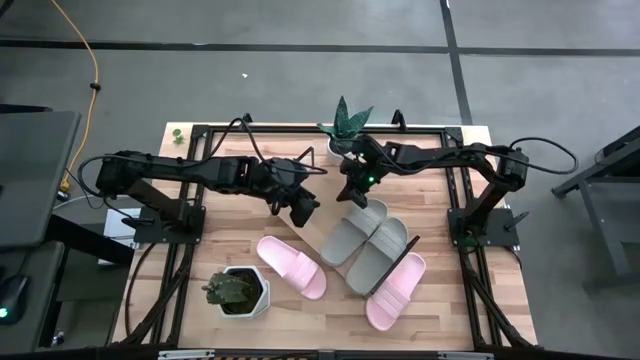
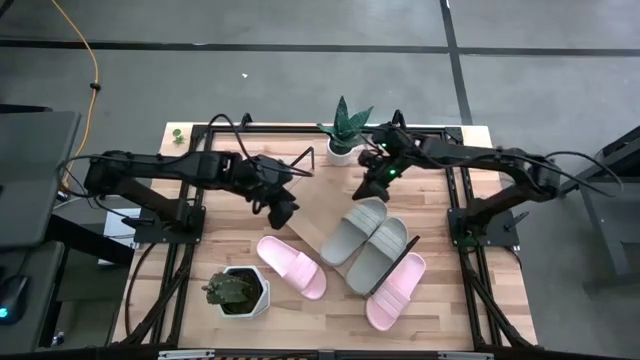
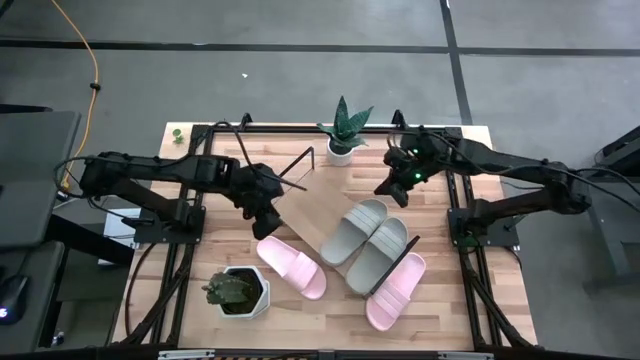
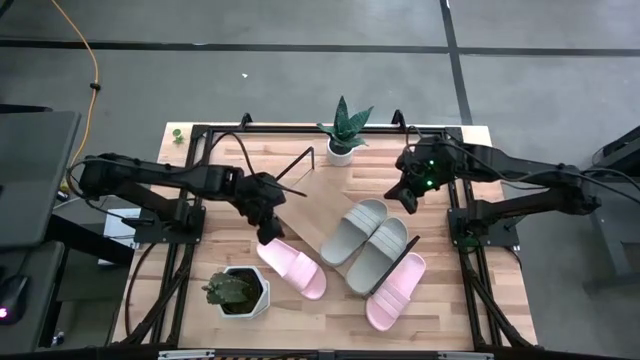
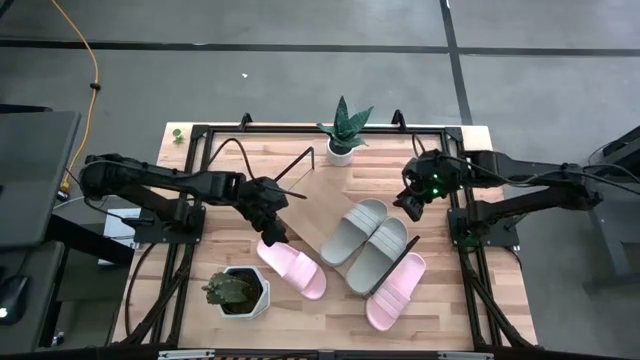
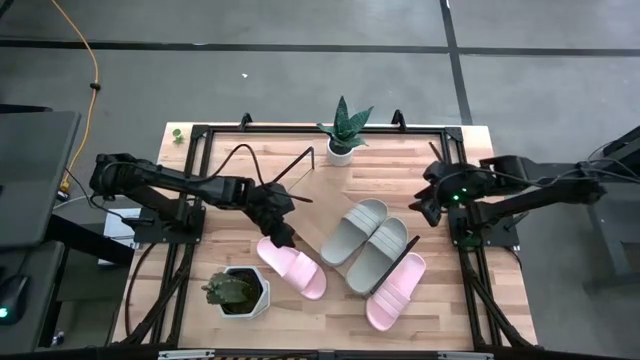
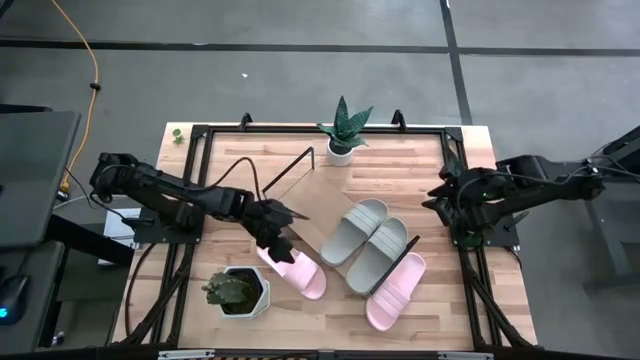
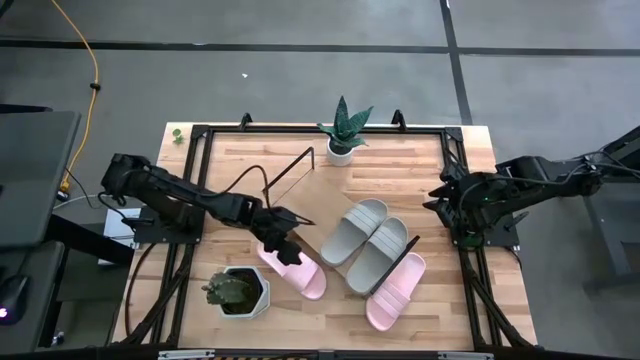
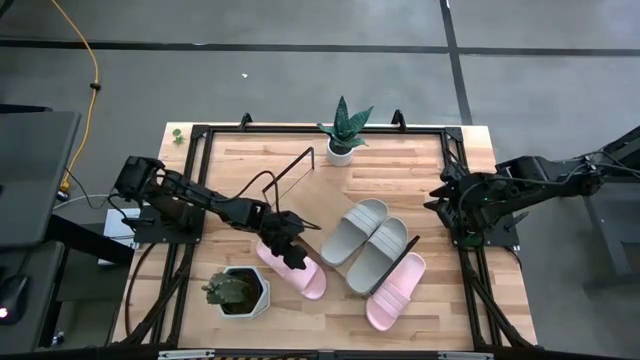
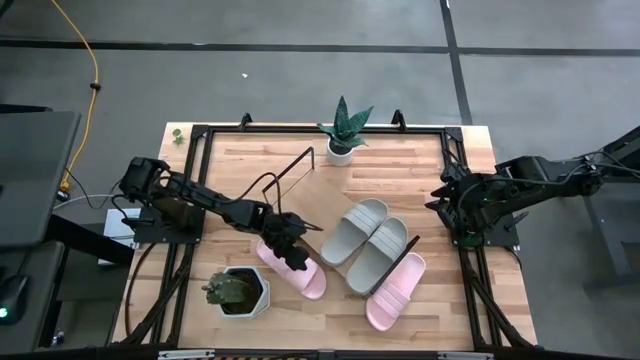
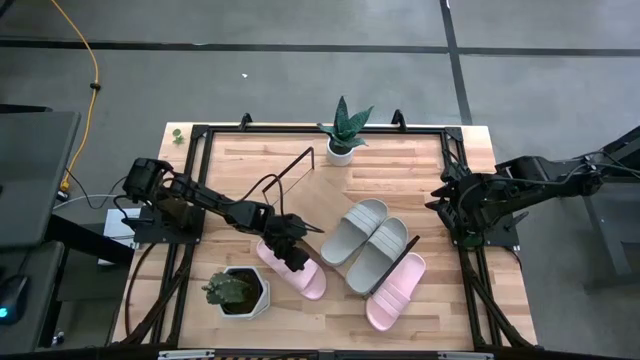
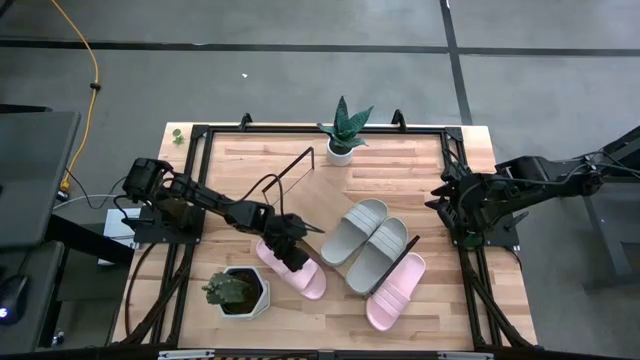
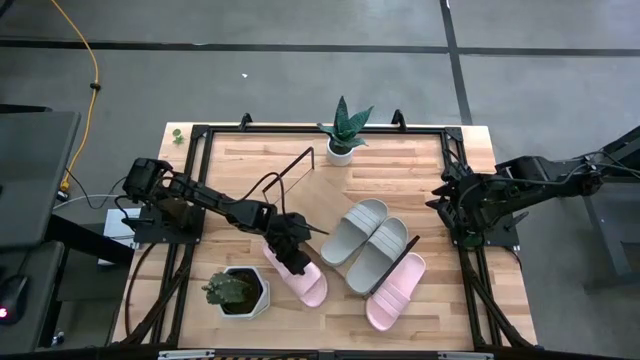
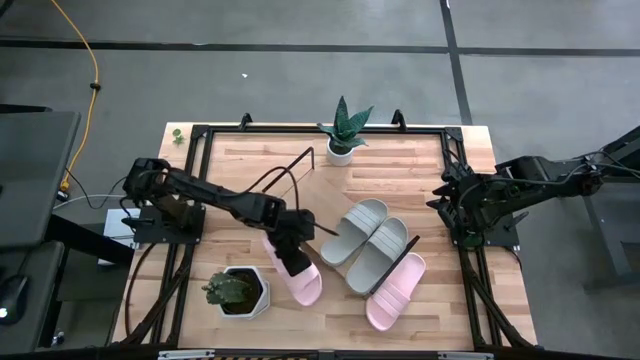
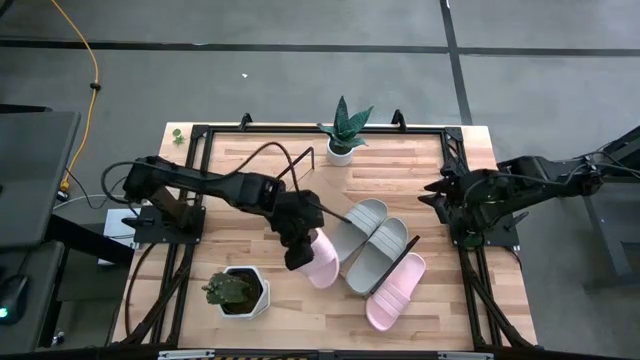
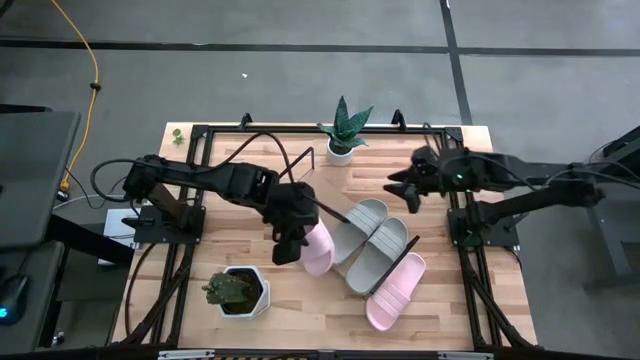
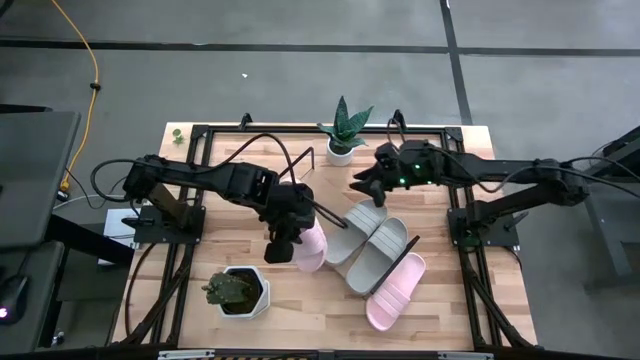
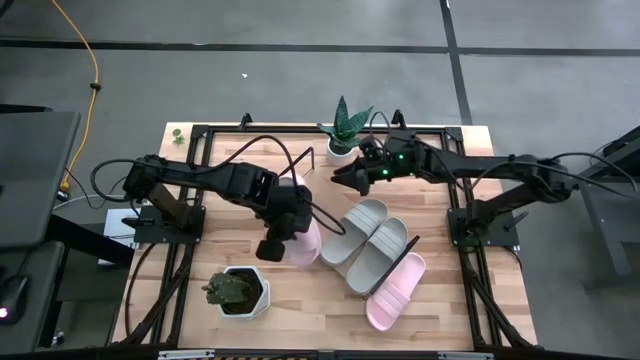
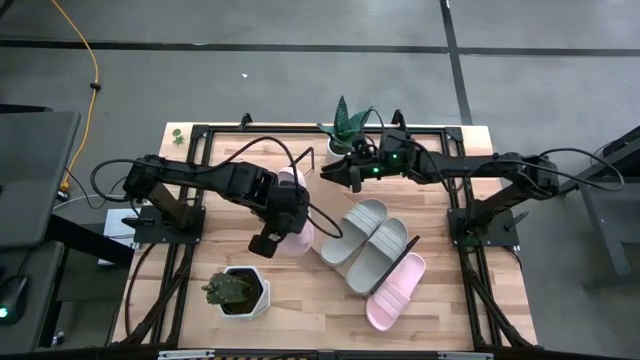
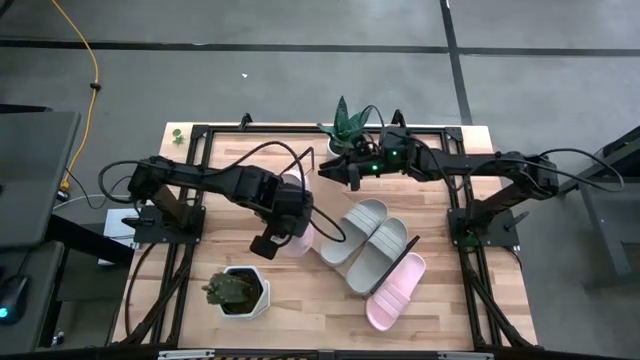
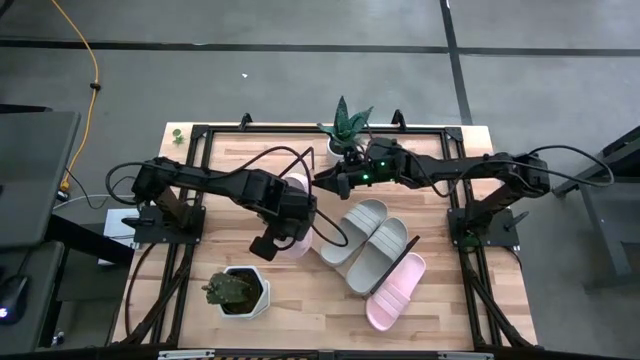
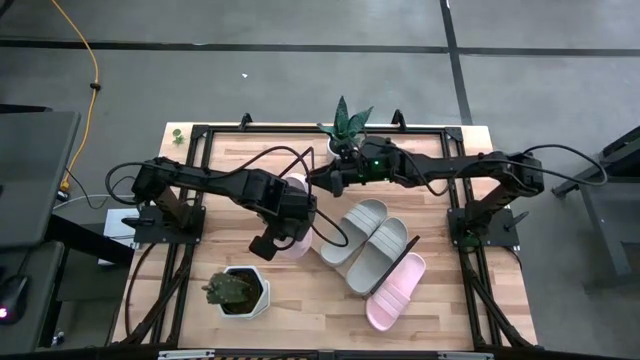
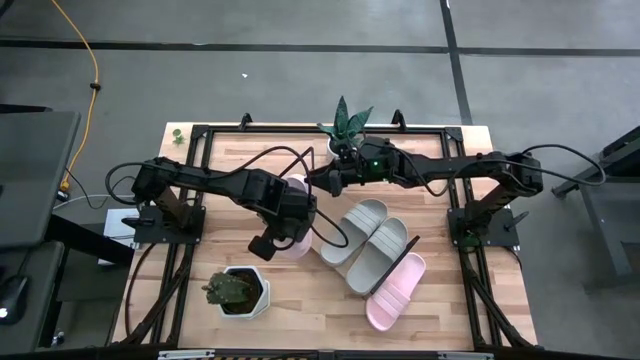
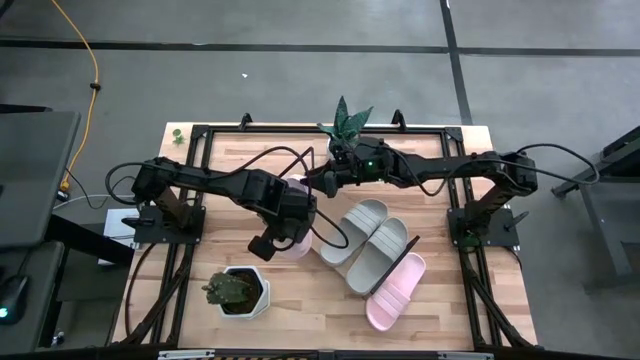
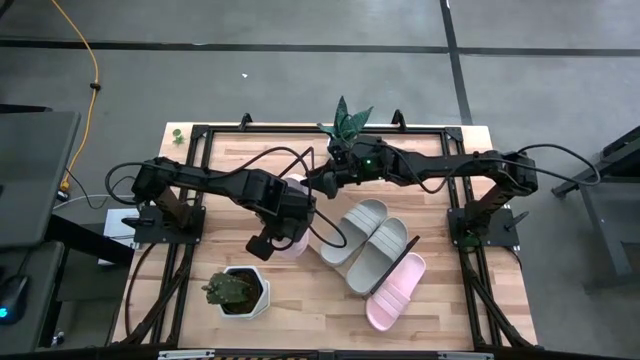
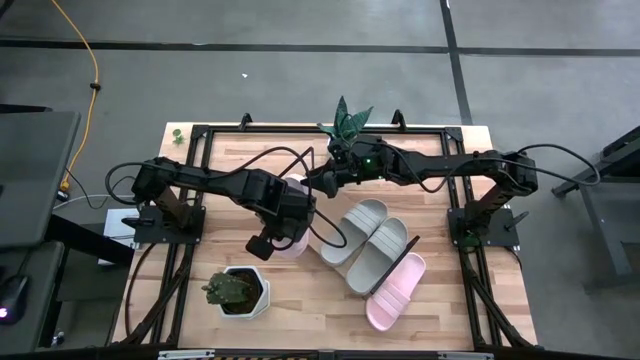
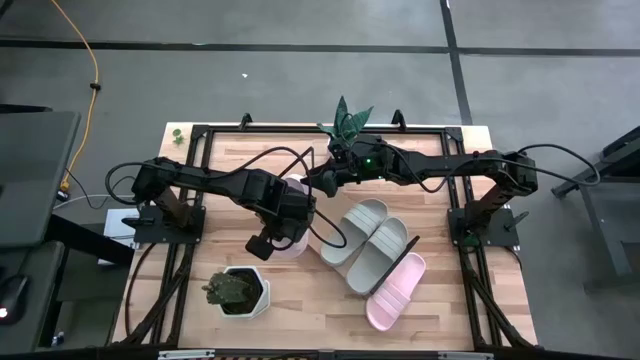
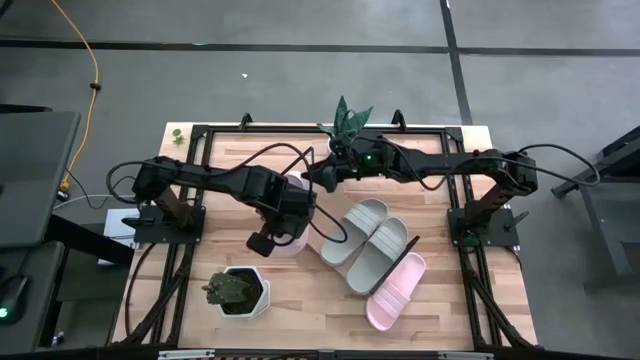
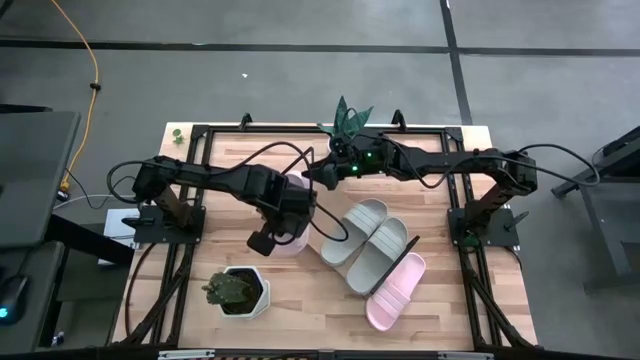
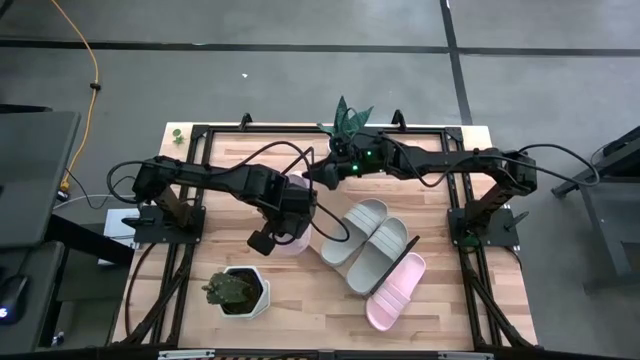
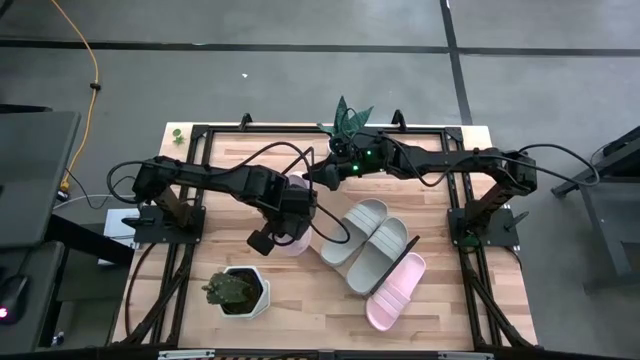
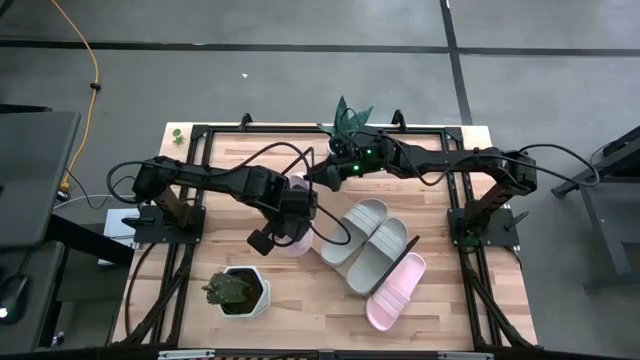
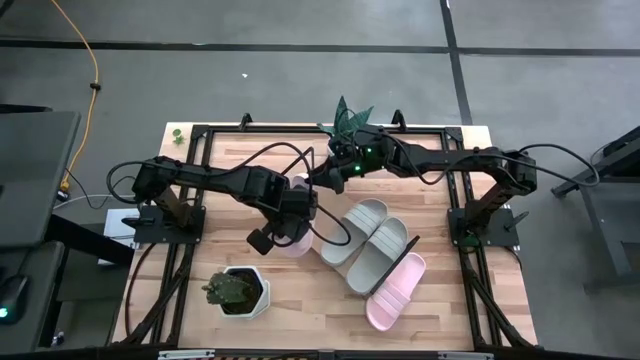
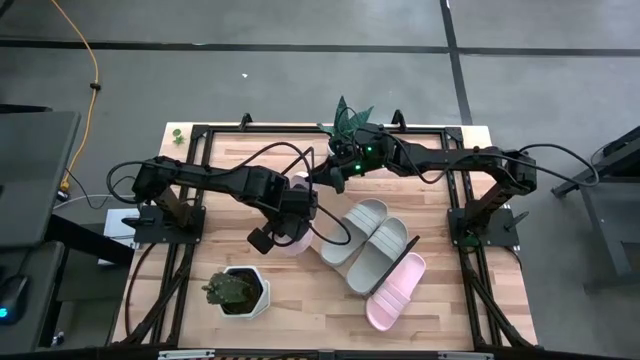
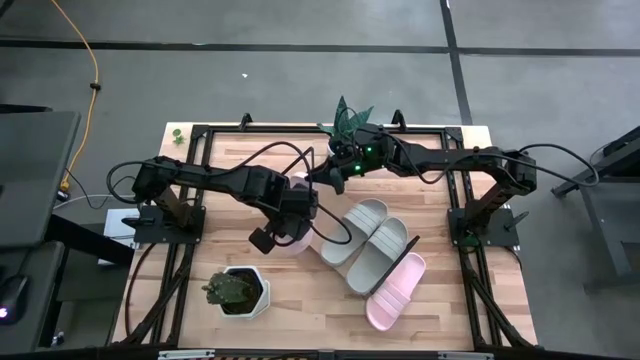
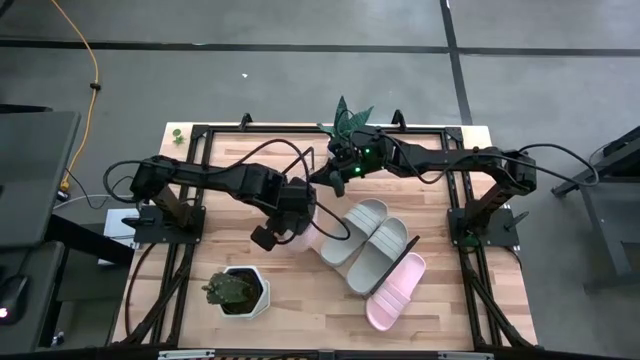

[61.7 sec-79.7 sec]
Task: Pick and place slides into the shelf
Put the left pink slide on the shelf

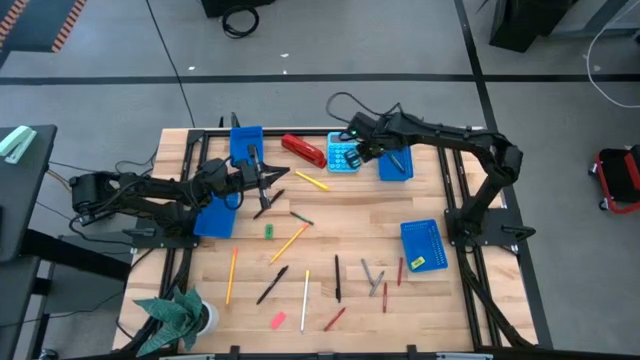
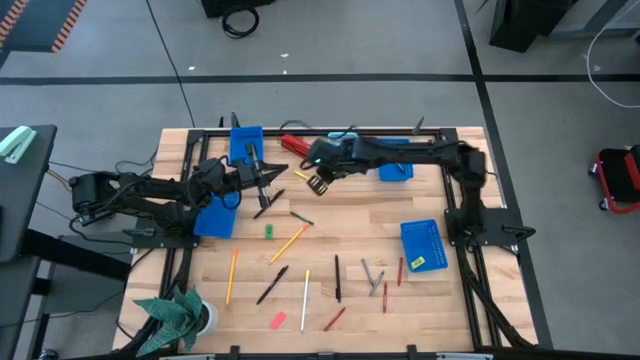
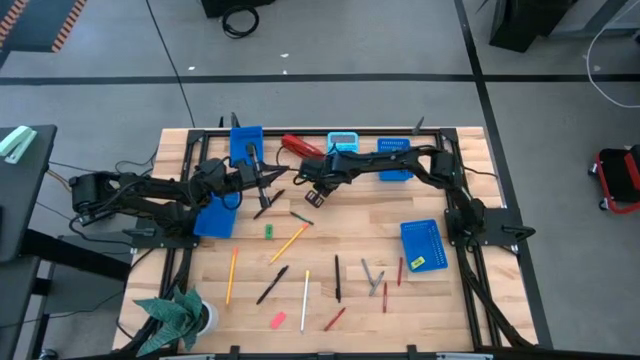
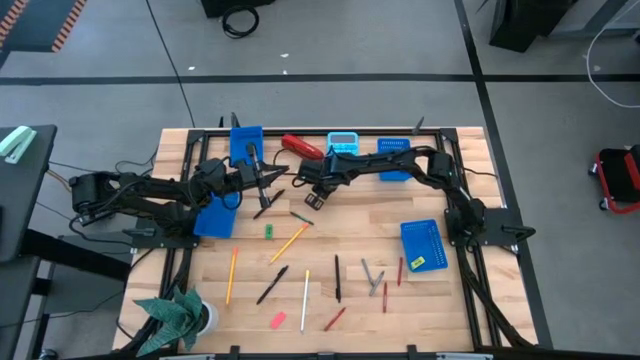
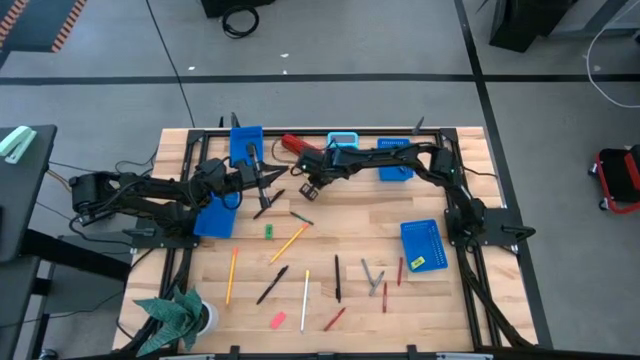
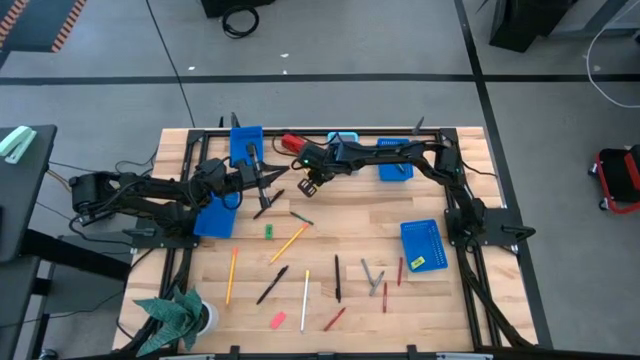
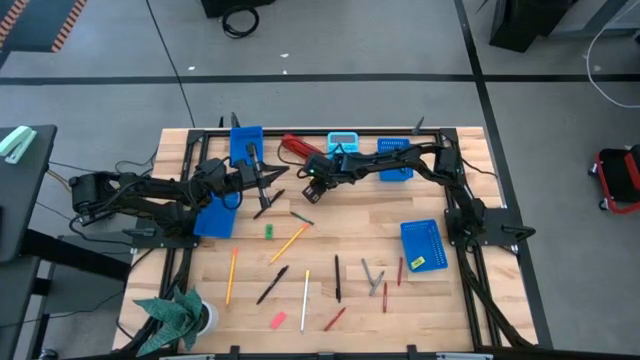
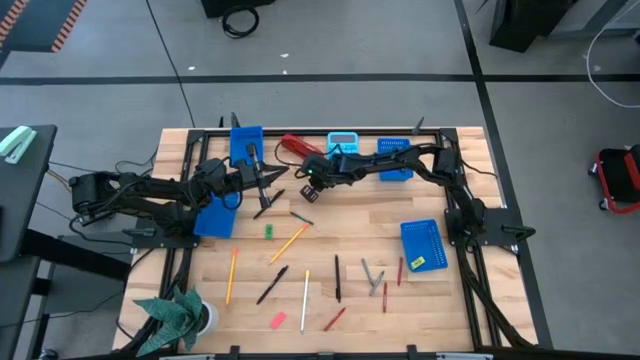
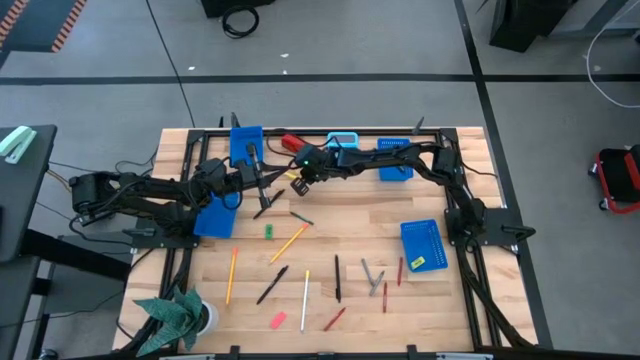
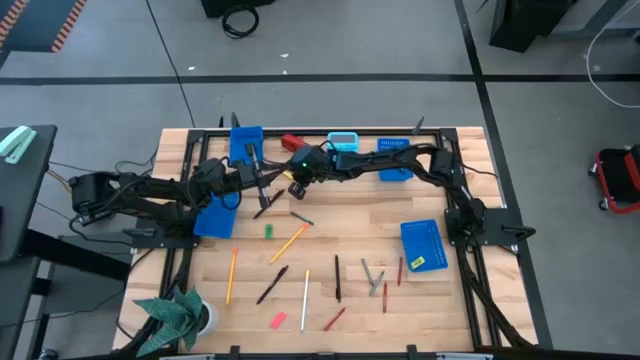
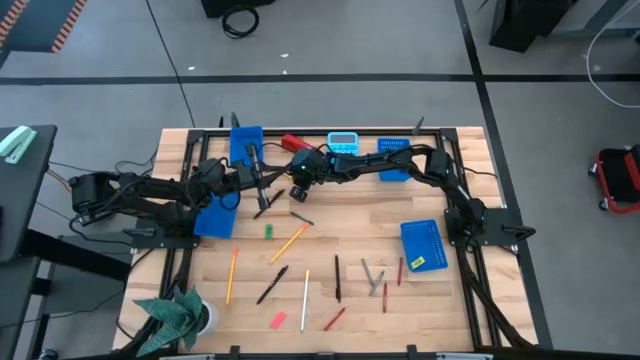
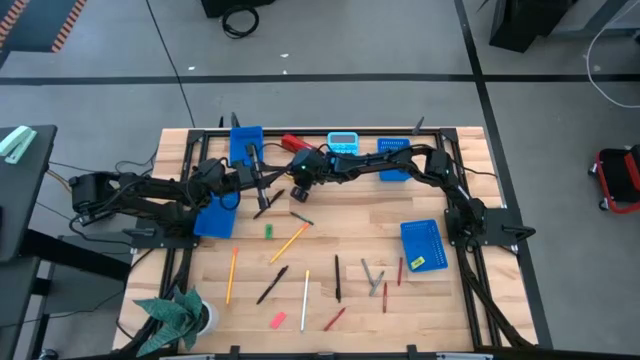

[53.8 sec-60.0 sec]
Task: Sort crayons/erasers/pens/pencils in bins
Put the yellow pen into the bin
